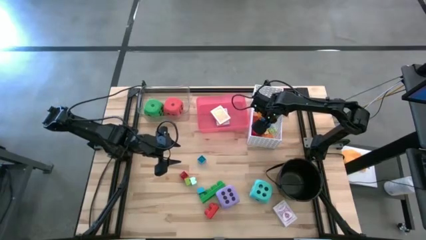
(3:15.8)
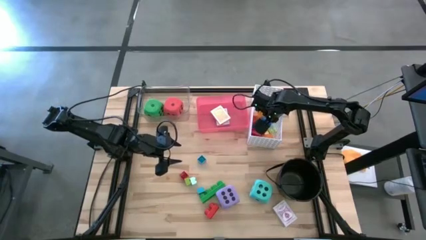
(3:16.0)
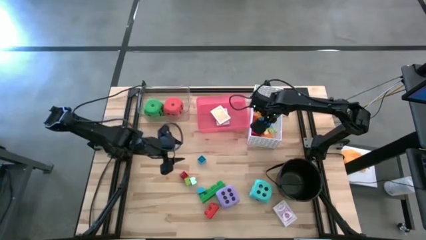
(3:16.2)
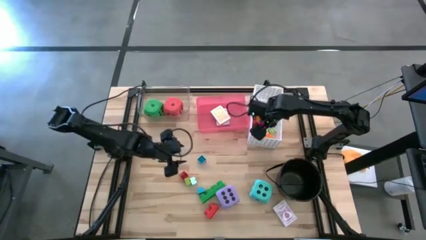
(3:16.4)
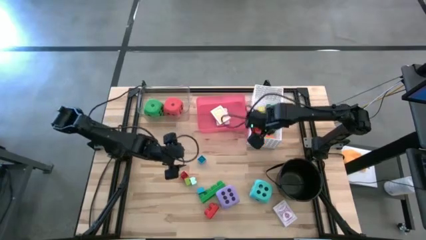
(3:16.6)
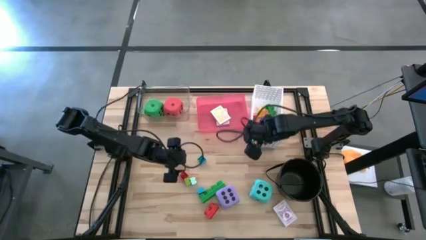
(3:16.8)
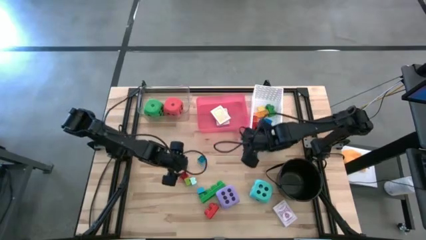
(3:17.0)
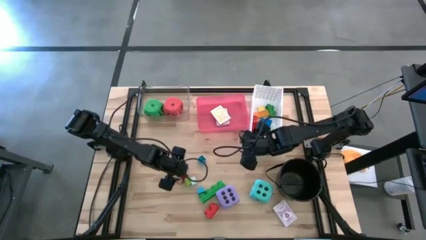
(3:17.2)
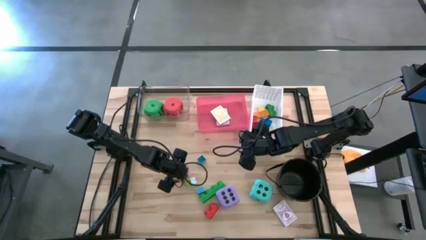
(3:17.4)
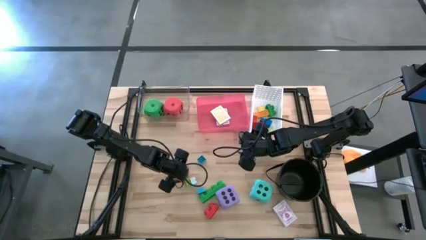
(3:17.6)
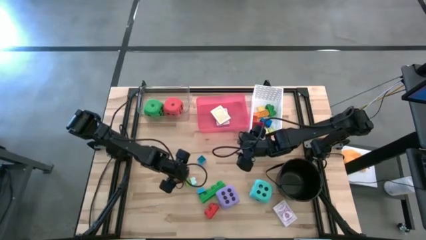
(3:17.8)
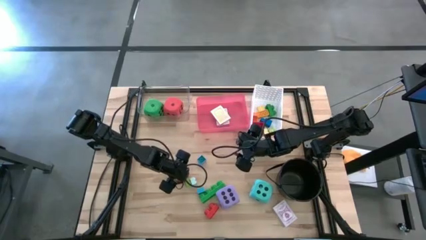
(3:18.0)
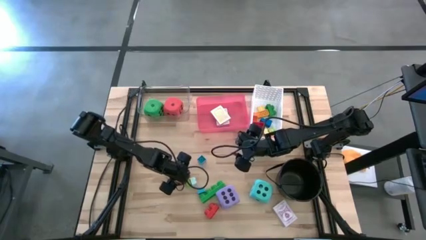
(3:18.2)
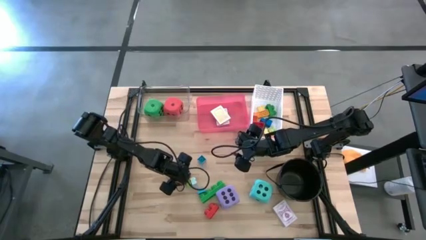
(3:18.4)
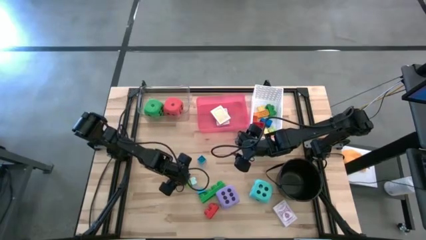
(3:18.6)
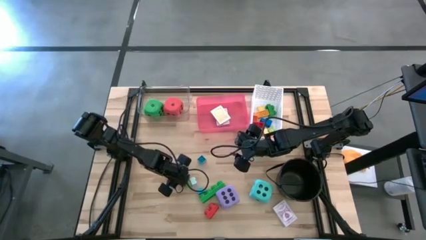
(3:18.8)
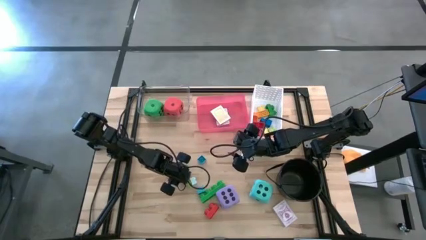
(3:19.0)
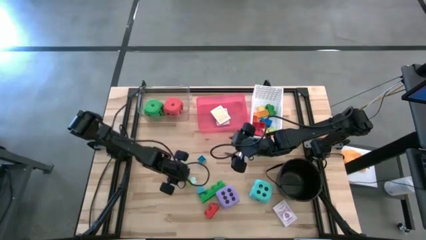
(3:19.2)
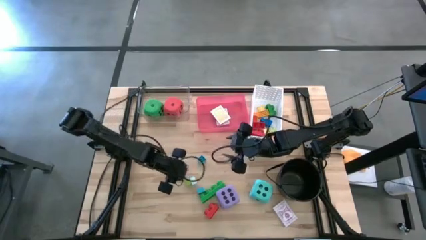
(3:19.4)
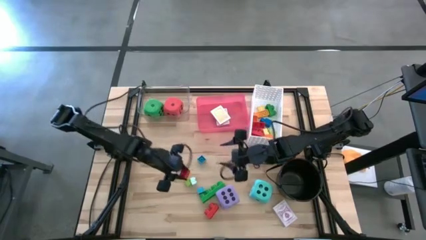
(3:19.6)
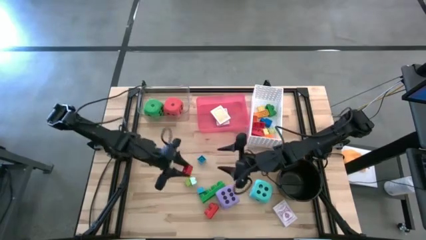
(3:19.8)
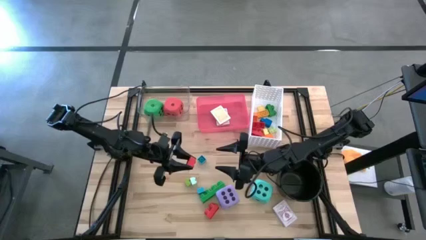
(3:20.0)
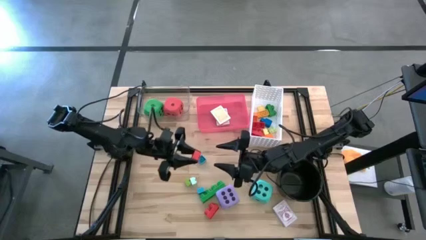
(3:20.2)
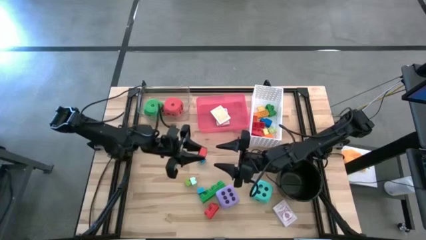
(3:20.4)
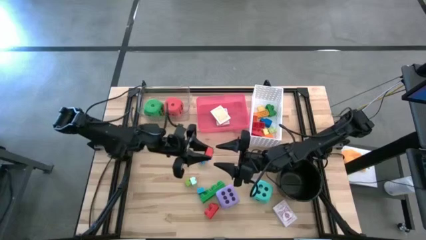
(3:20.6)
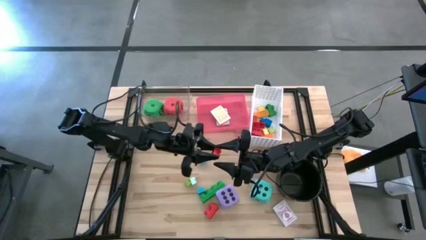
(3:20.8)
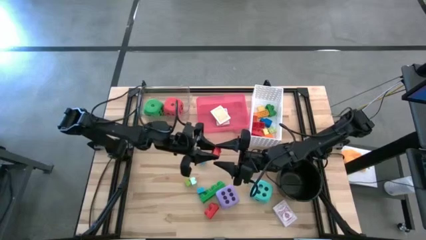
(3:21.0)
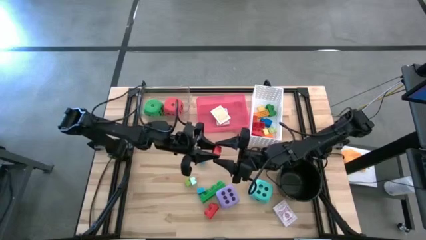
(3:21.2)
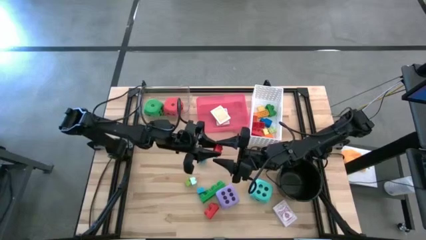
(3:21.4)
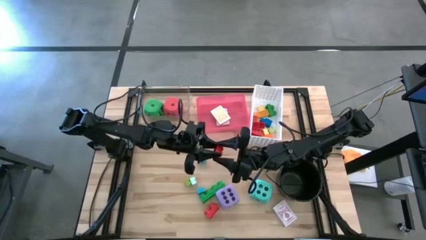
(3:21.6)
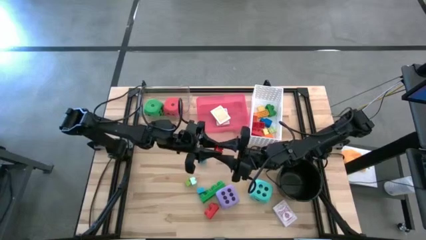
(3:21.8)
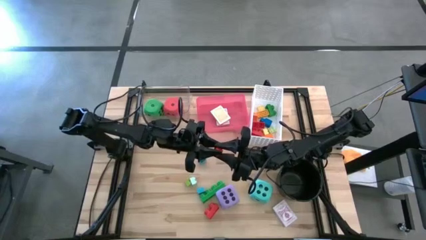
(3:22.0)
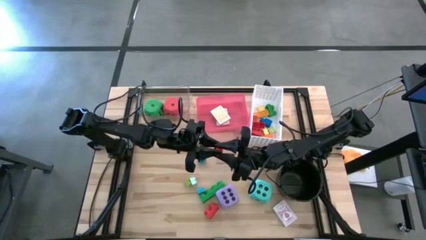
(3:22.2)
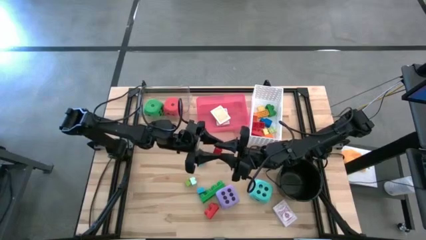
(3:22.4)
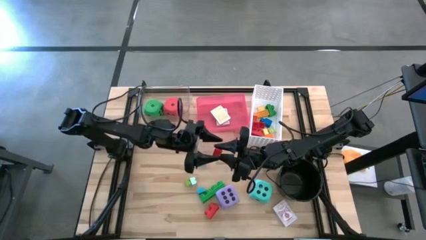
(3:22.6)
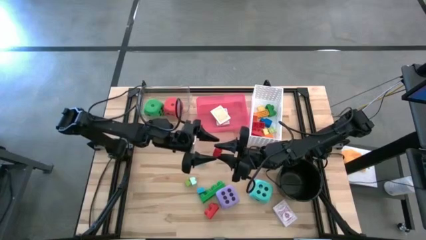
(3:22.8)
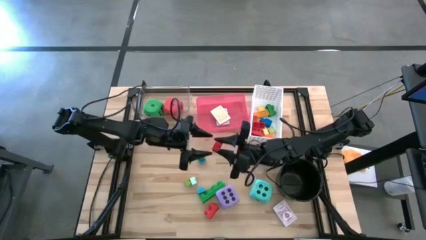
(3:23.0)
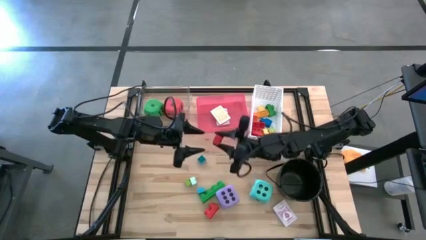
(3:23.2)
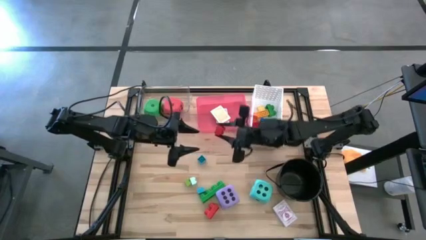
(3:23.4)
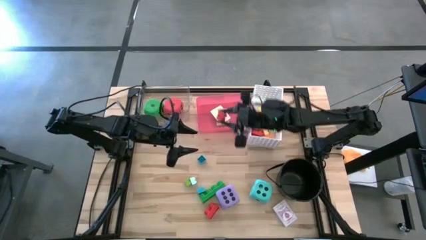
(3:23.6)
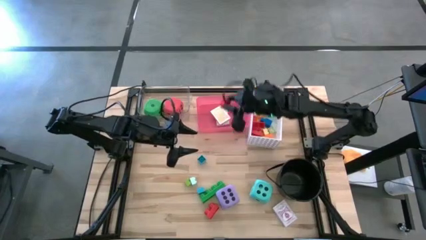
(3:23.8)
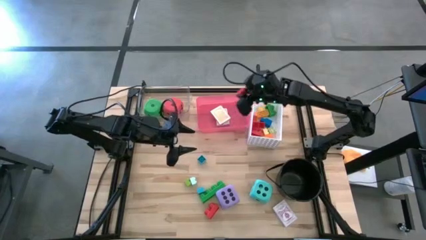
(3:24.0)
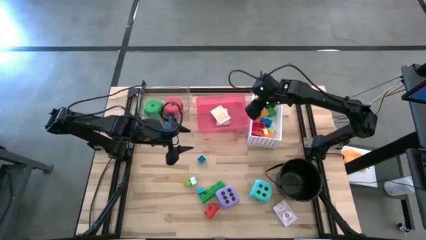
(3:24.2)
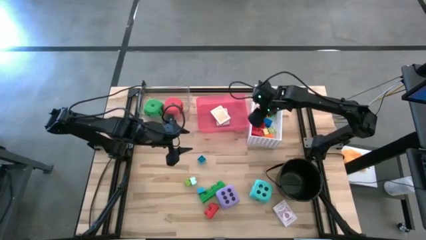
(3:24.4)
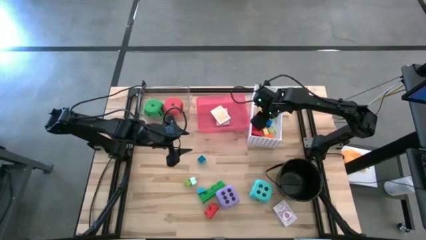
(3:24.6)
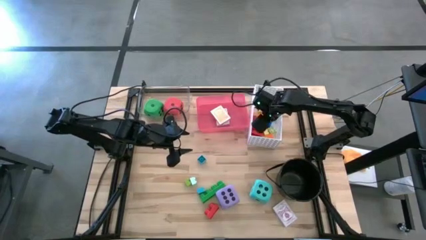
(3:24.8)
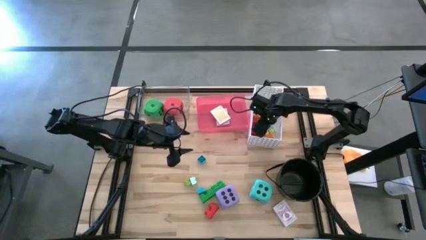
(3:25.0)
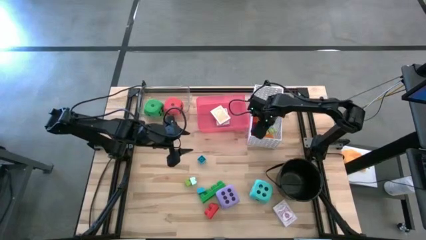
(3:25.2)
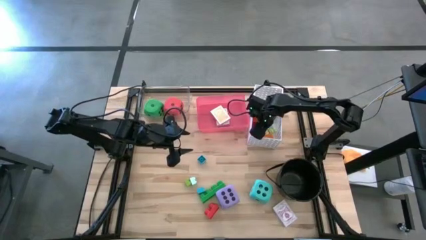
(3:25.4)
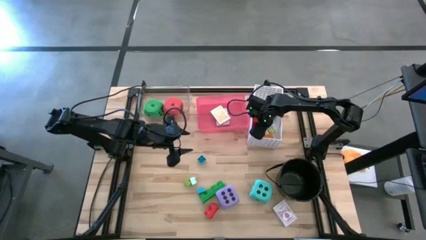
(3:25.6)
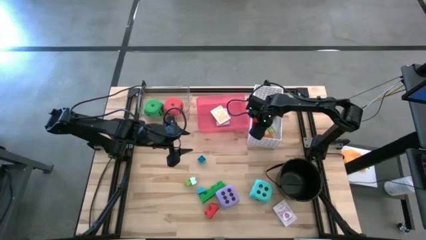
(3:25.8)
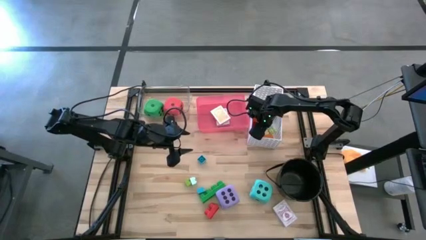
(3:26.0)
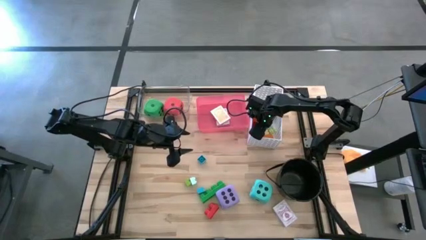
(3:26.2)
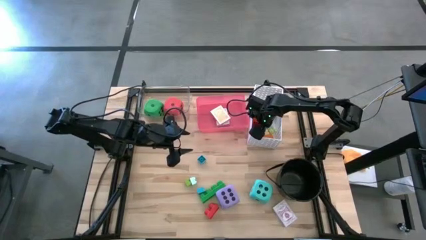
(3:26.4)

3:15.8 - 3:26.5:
Task: Pick & Place Toys
Put the small red game piece into the white bin

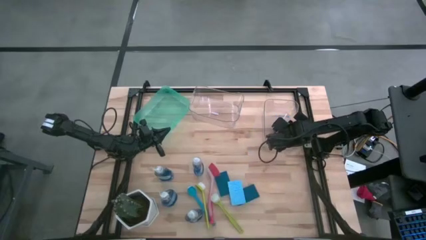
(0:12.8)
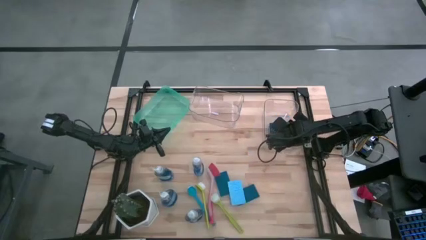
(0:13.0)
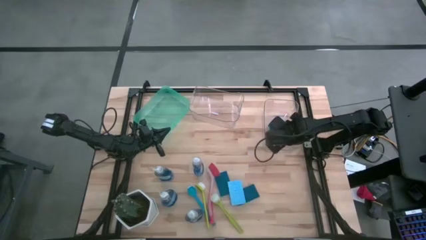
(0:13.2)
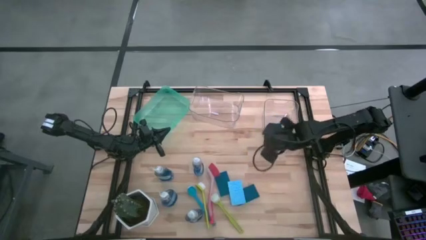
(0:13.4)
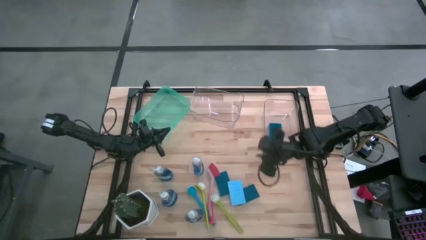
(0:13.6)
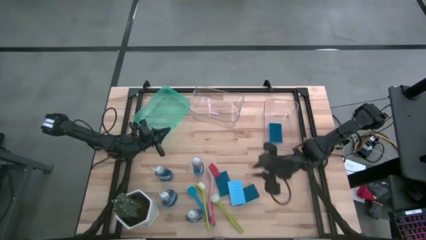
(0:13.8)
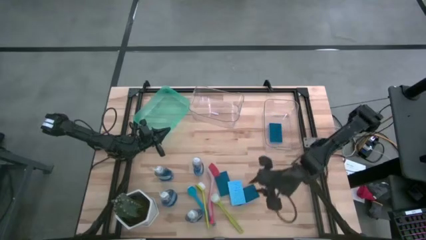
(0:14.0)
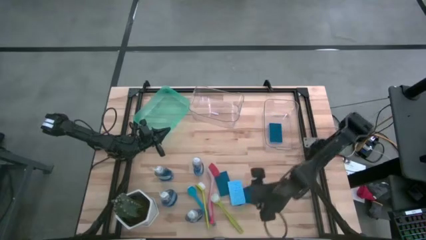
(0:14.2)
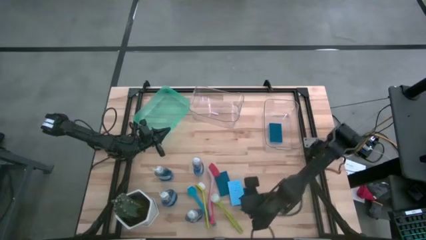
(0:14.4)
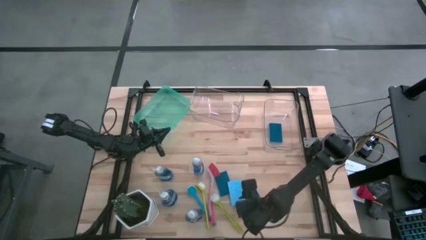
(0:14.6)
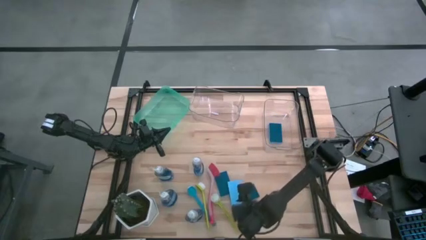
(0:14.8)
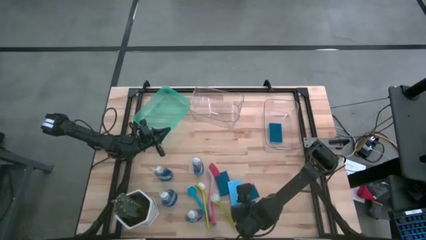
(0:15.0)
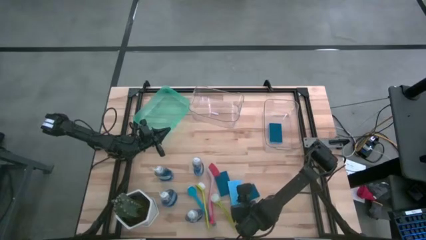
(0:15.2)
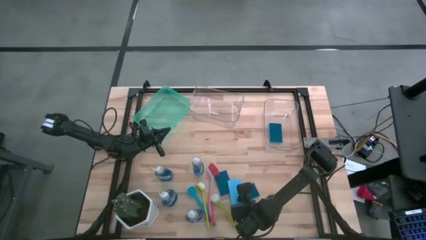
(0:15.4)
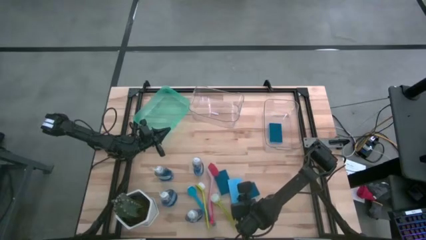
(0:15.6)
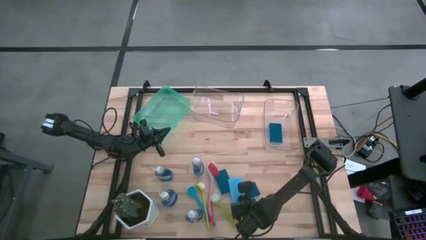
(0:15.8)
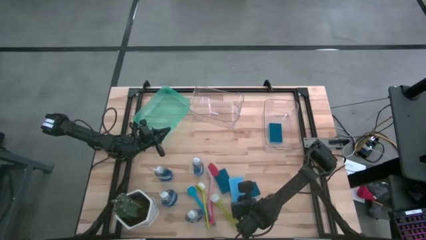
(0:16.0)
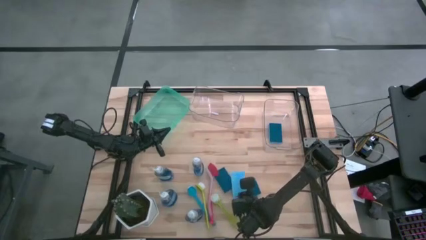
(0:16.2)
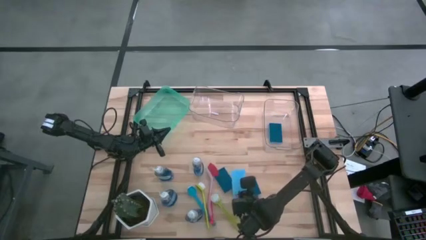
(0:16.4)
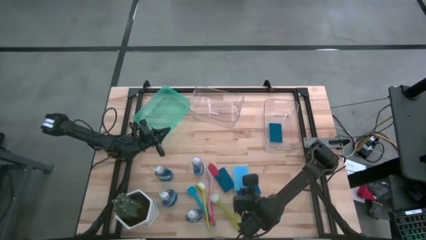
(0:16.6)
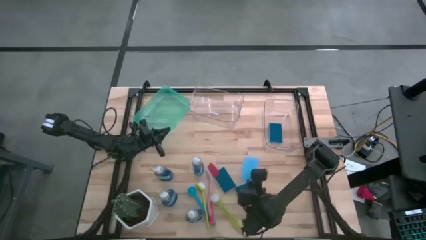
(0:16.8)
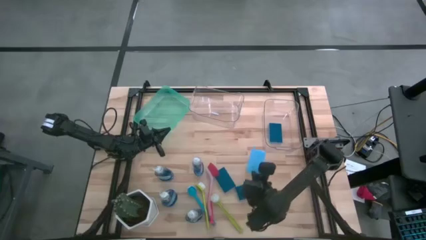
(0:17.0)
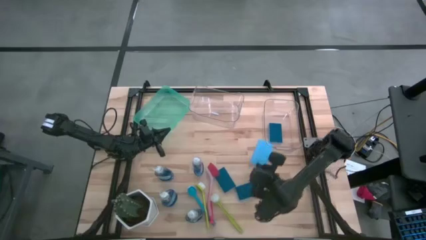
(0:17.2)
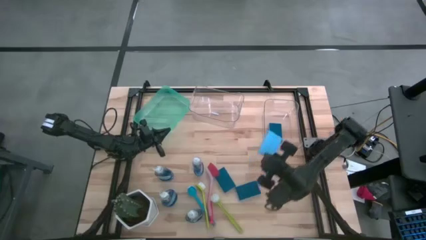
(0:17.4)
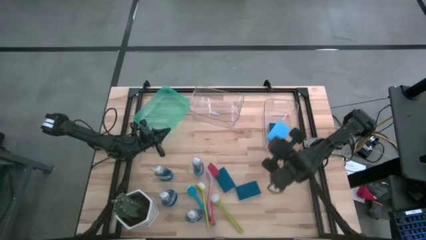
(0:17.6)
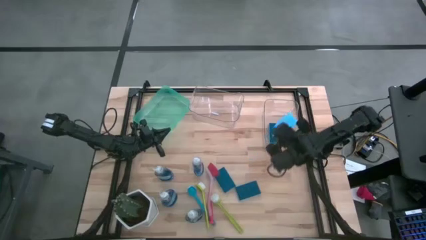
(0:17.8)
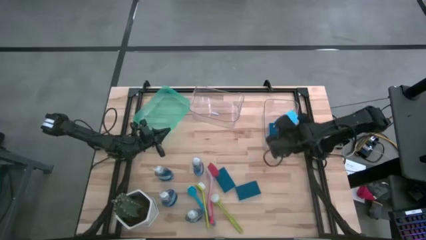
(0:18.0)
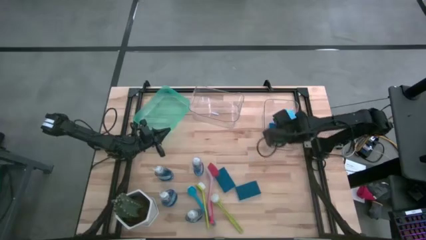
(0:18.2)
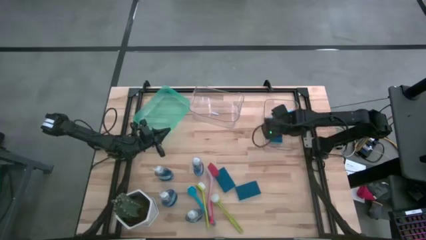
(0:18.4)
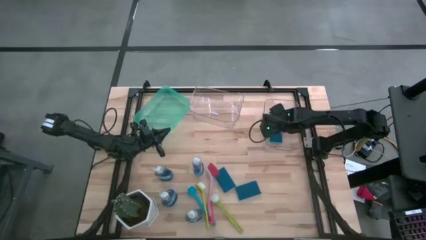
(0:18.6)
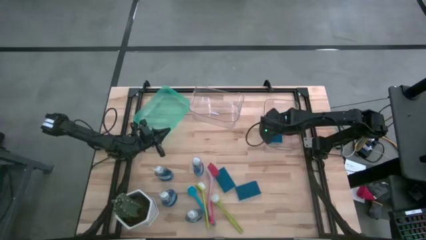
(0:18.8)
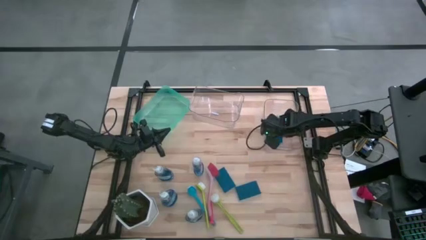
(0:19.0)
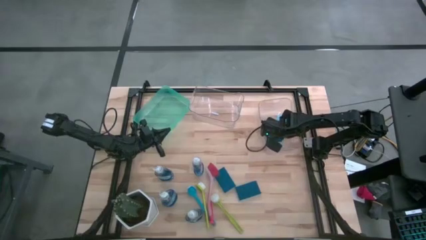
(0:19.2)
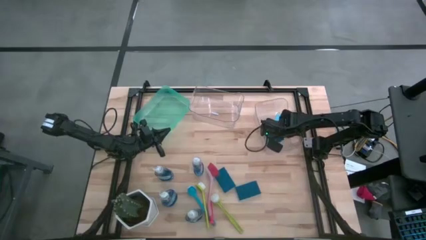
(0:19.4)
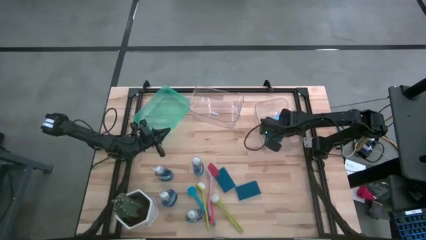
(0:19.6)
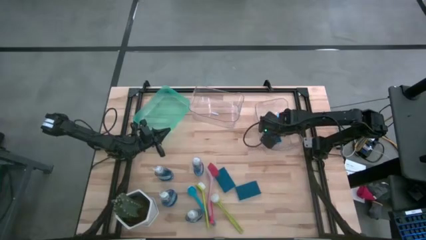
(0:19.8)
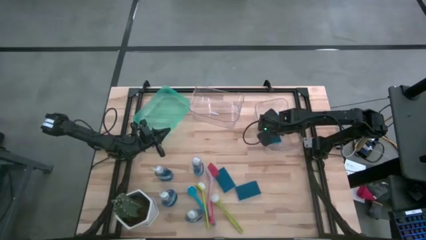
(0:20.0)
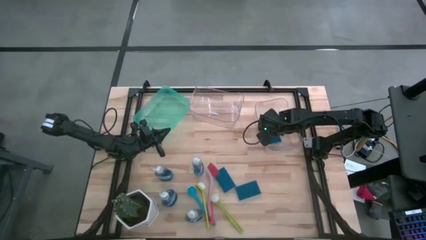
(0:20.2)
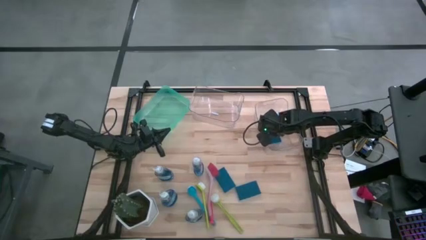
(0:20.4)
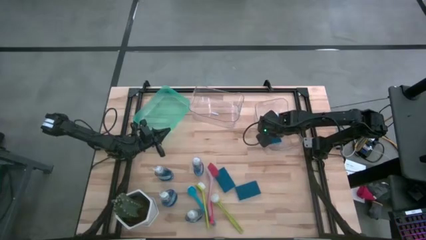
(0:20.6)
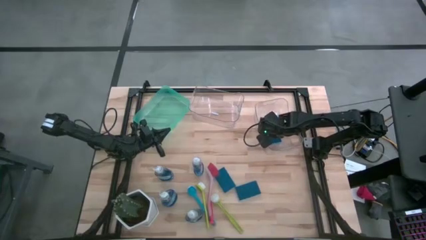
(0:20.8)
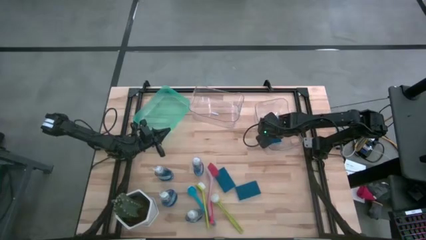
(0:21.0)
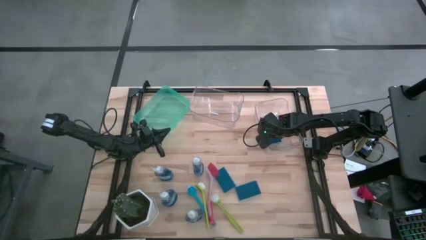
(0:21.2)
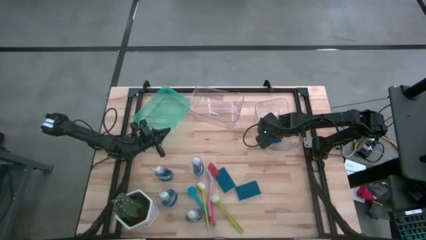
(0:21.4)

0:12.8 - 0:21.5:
Task: Pick & Place Kitchen Sink Supplies
Put the blue sponge in the right transparent bin
